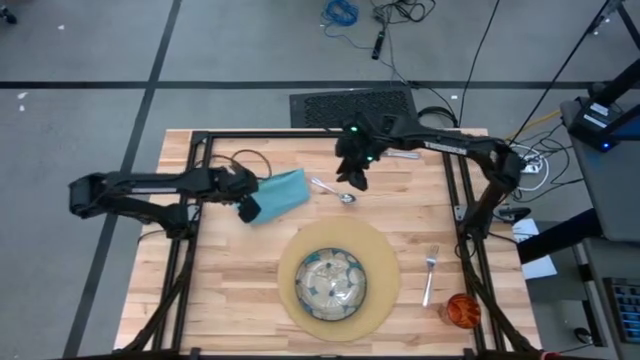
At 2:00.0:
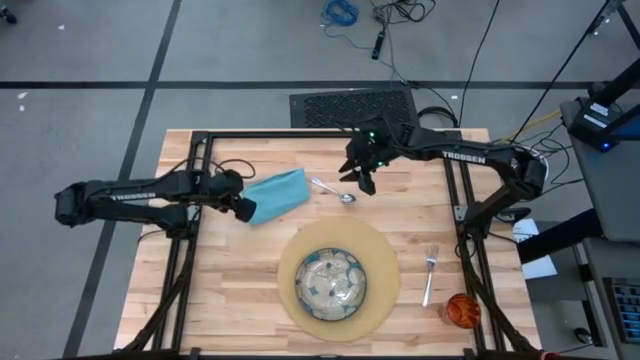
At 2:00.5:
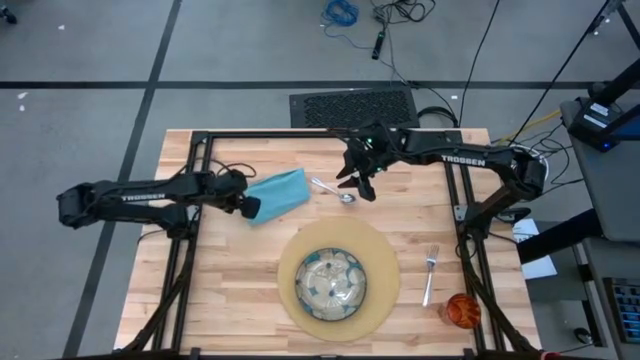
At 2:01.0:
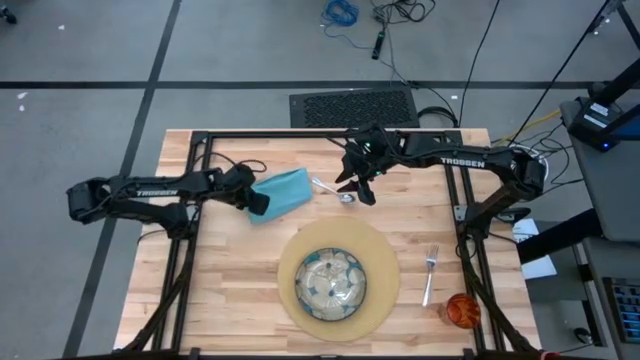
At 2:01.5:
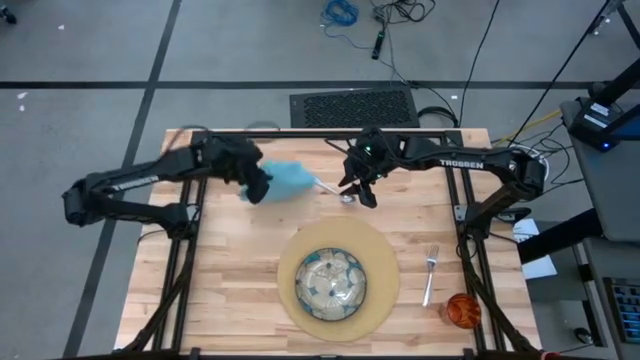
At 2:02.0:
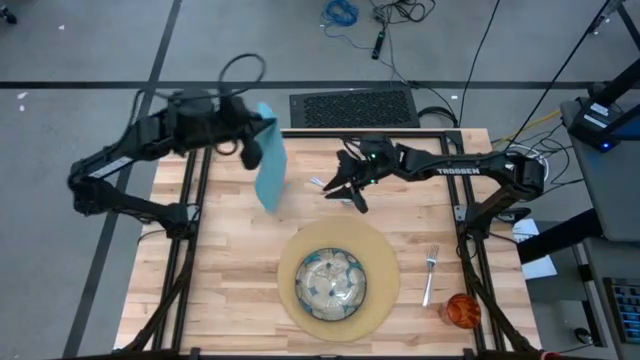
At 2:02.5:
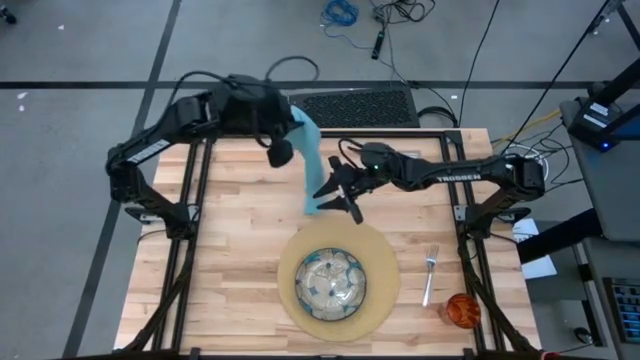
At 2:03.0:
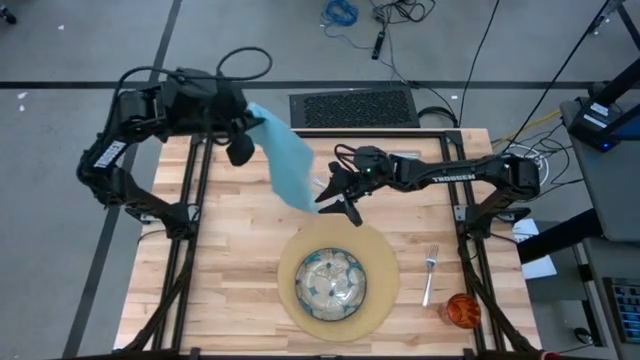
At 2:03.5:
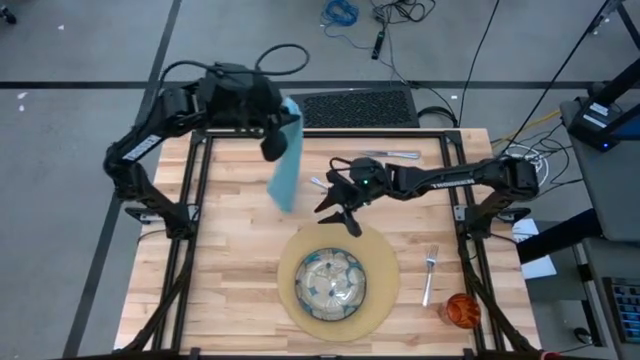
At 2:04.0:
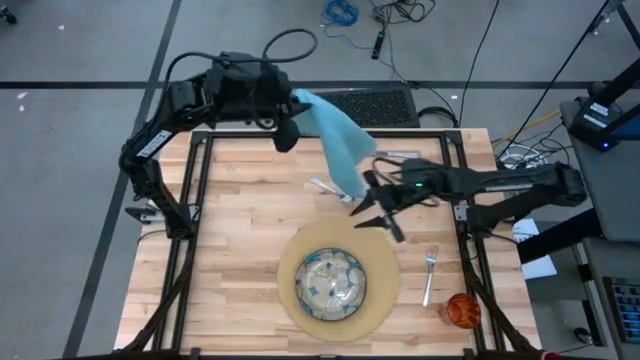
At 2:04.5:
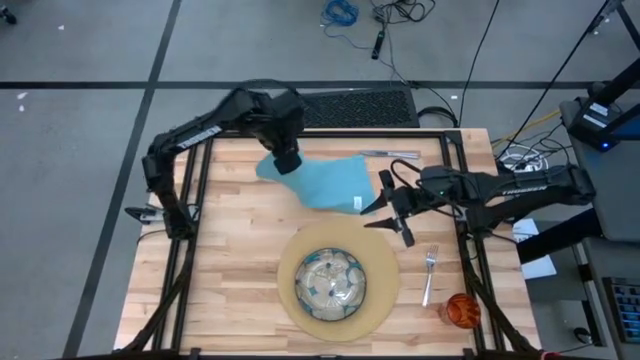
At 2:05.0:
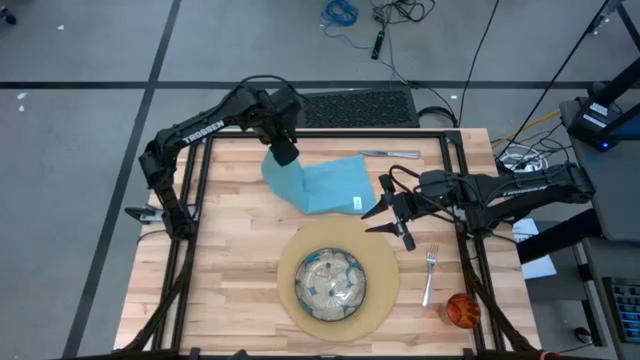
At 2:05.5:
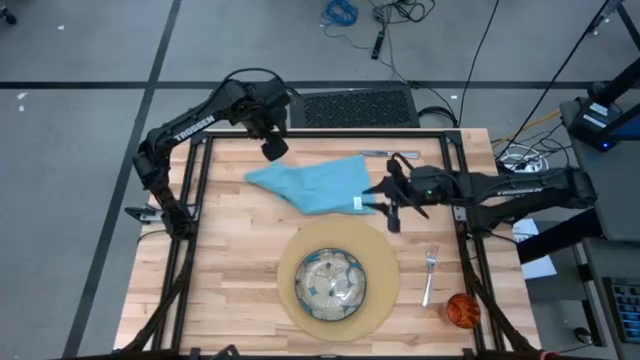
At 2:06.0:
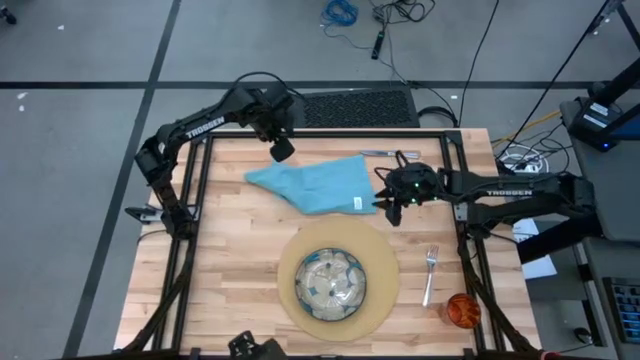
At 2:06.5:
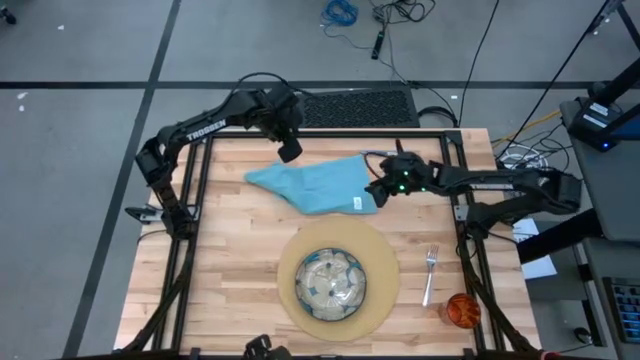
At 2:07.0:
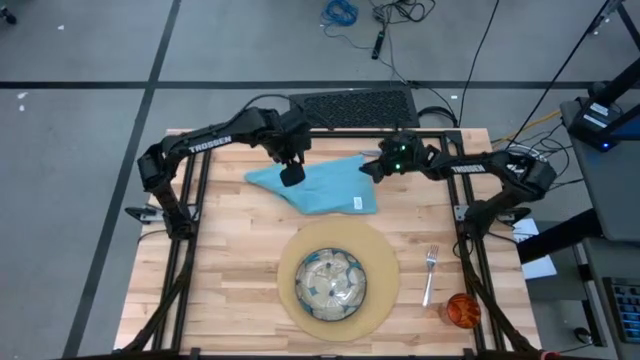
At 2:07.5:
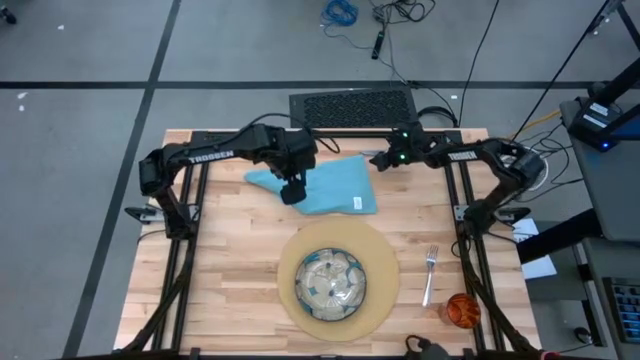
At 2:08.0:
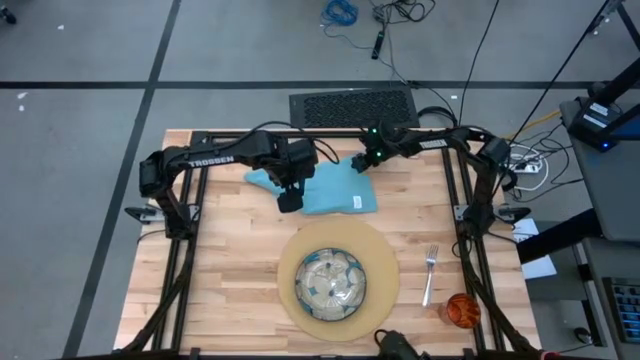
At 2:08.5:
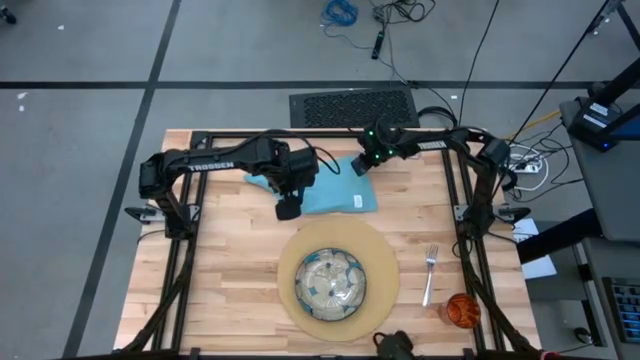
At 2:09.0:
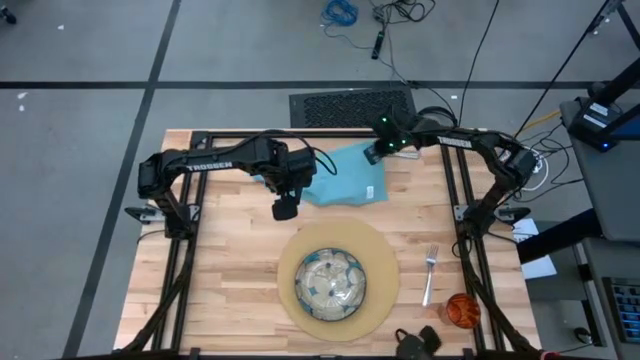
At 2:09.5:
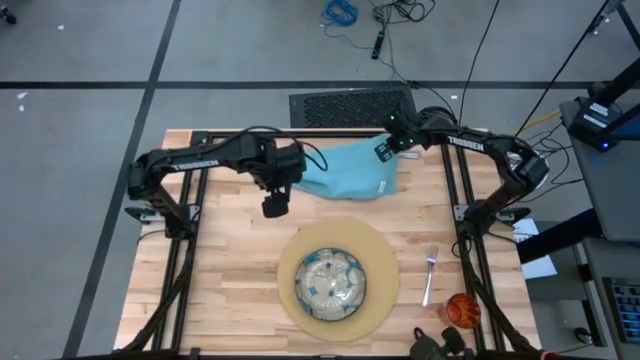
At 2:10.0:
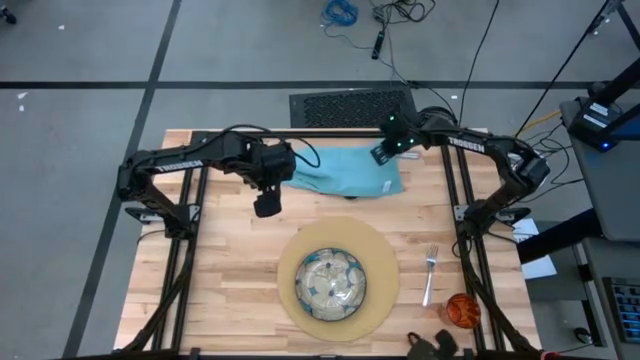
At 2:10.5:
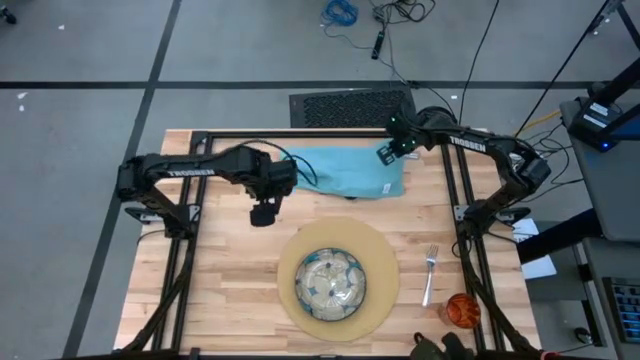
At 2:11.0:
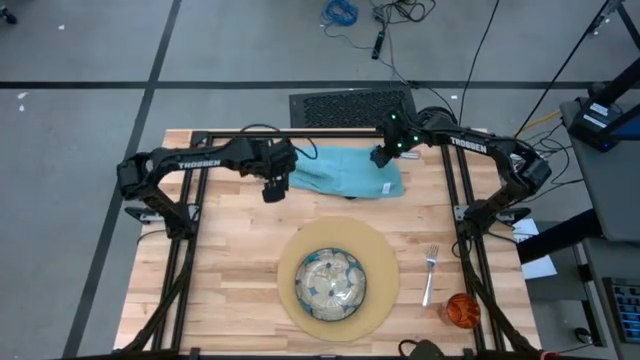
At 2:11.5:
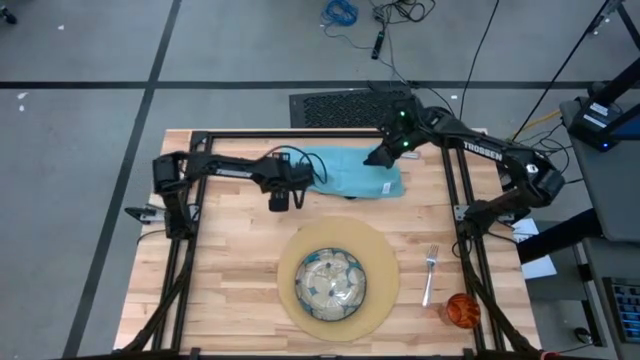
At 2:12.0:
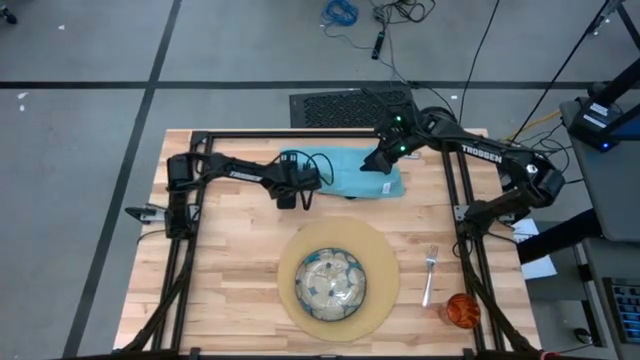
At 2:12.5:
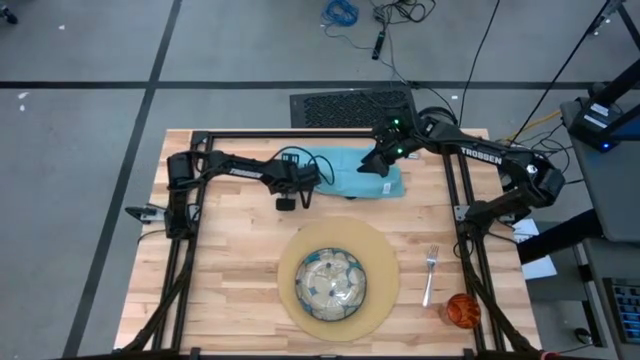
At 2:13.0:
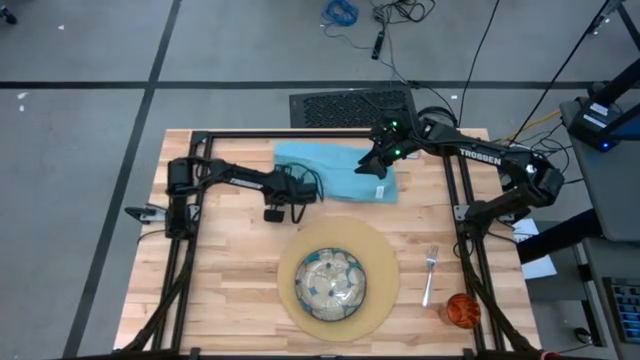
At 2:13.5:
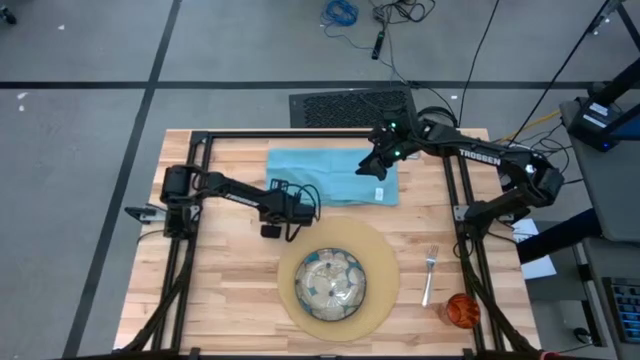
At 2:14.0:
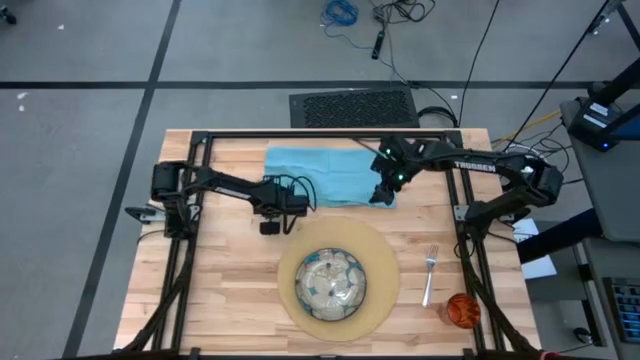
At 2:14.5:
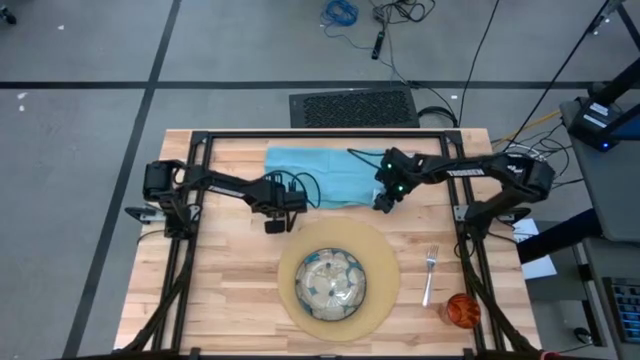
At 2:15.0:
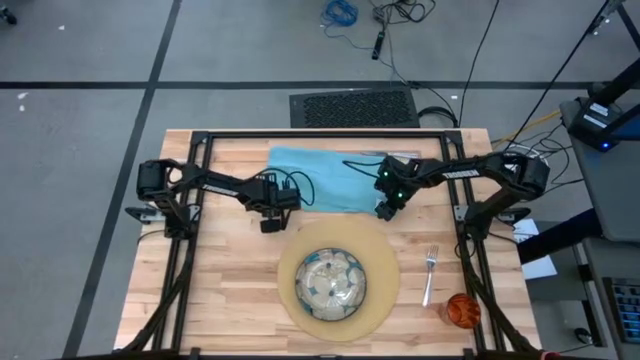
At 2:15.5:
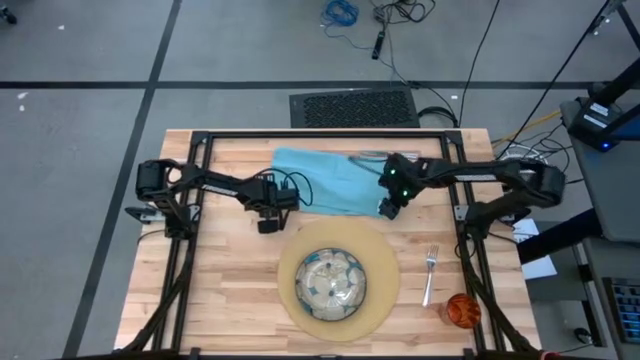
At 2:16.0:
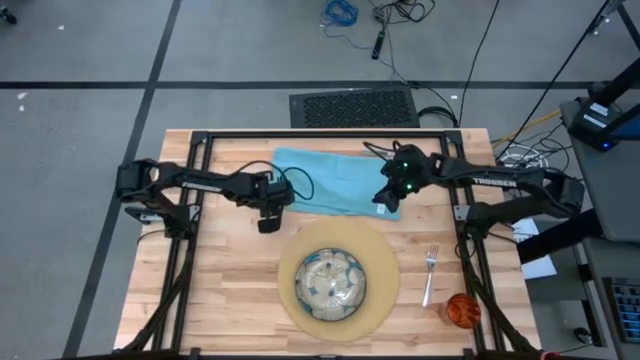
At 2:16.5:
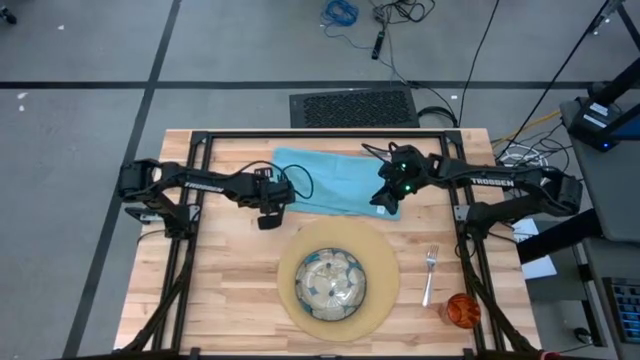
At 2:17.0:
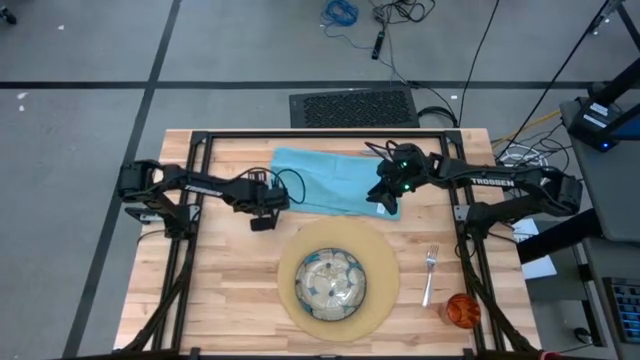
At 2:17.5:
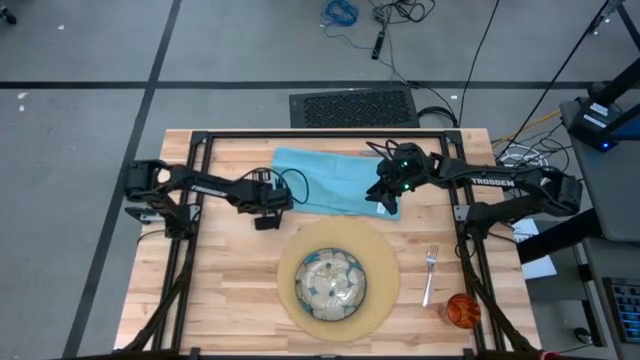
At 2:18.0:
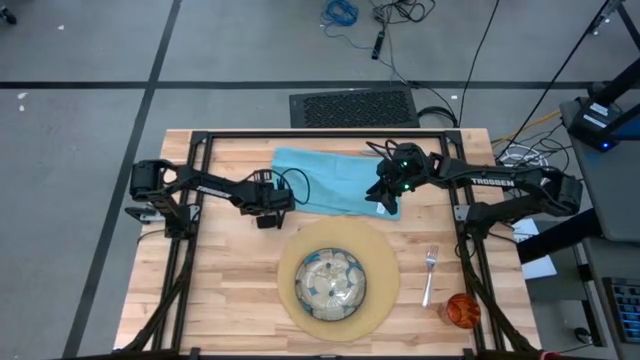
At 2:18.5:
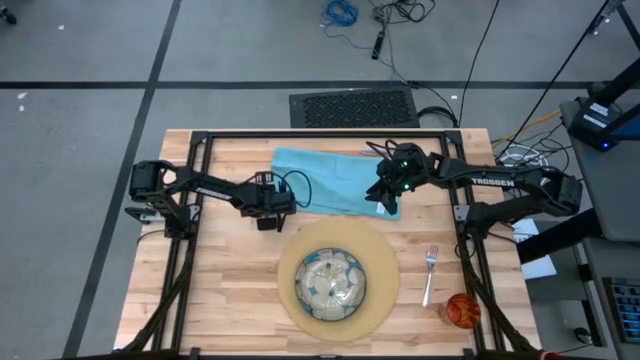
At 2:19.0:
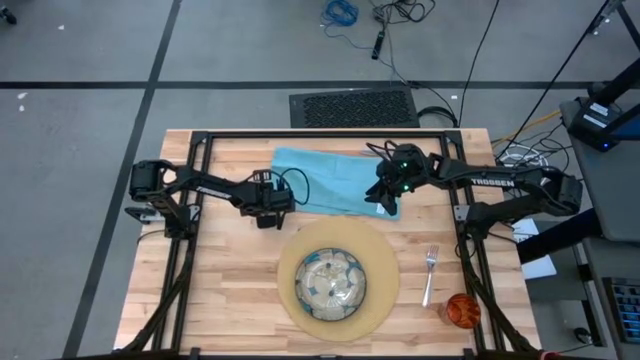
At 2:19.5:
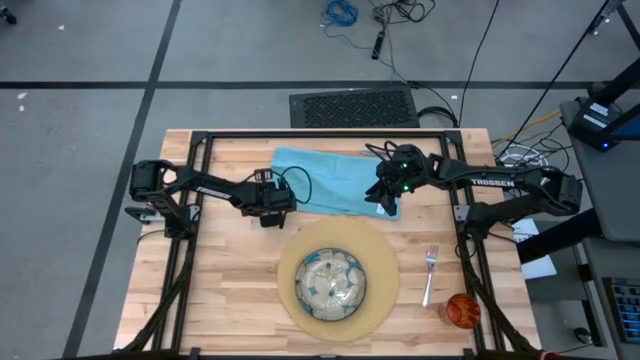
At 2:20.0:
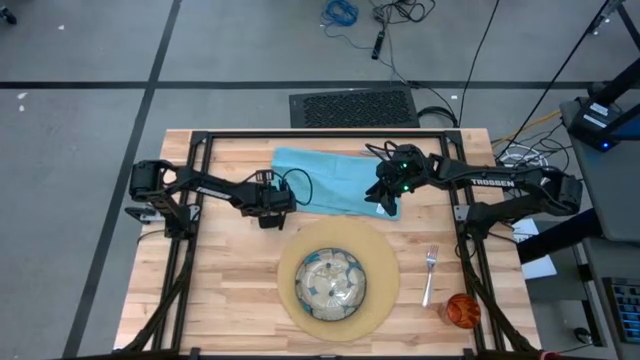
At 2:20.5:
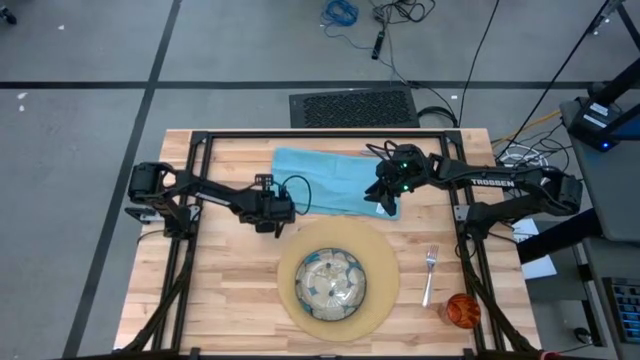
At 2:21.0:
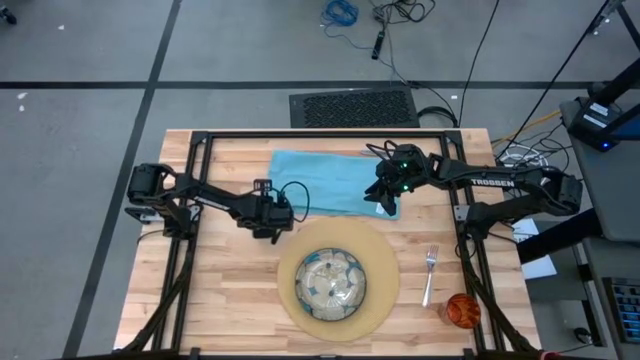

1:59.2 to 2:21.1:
Task: Set table place
Fold the blue napkin
